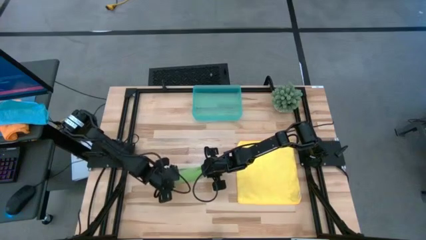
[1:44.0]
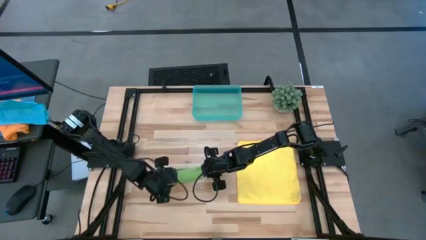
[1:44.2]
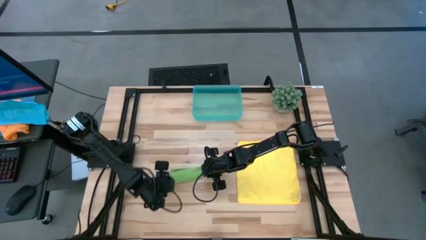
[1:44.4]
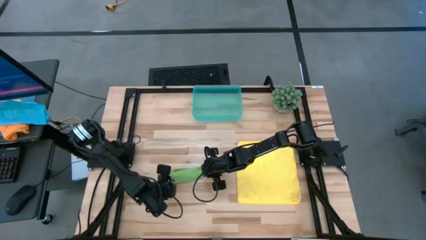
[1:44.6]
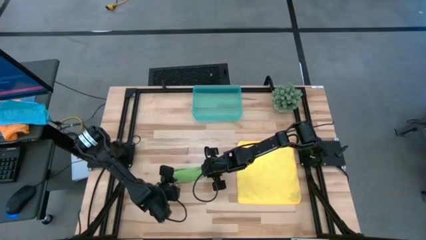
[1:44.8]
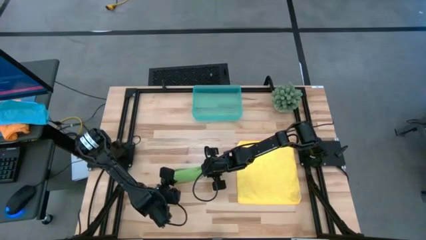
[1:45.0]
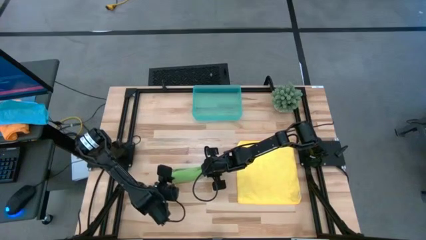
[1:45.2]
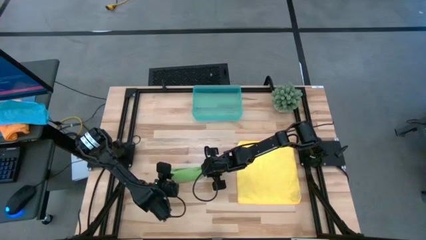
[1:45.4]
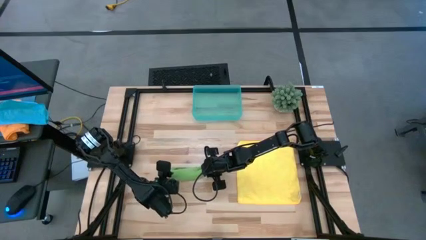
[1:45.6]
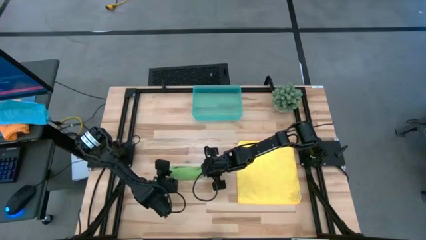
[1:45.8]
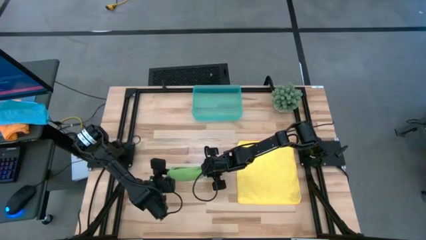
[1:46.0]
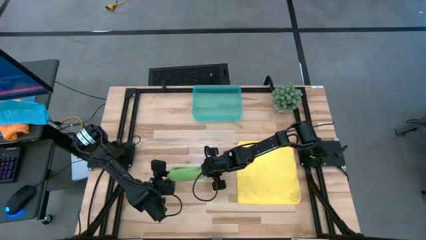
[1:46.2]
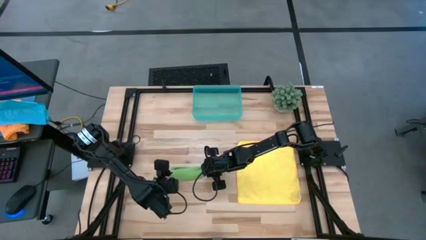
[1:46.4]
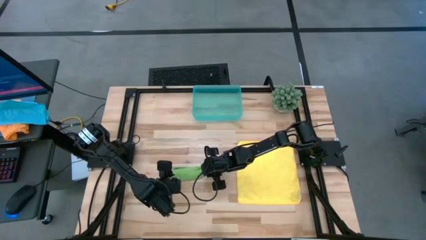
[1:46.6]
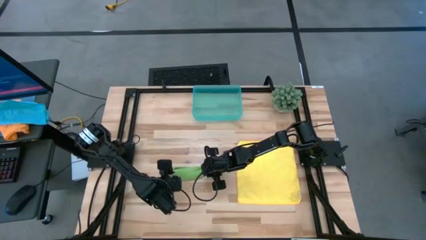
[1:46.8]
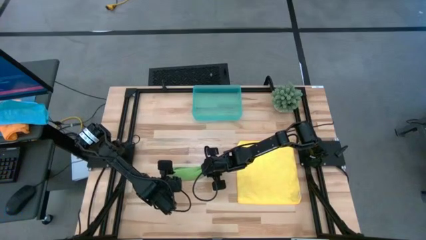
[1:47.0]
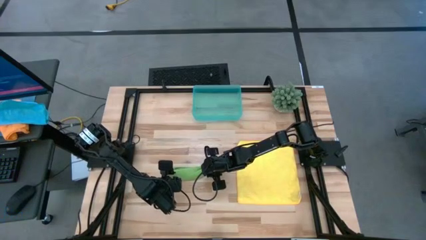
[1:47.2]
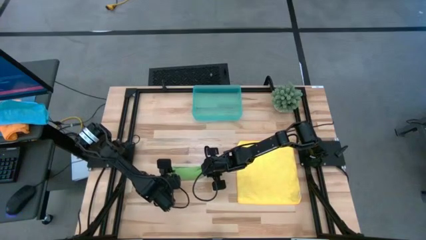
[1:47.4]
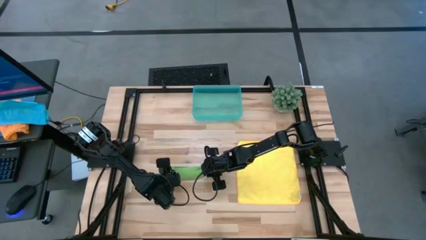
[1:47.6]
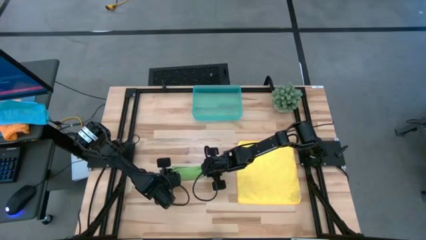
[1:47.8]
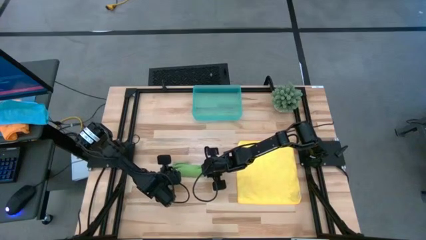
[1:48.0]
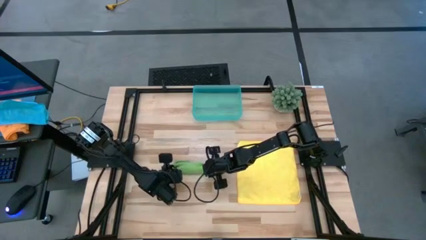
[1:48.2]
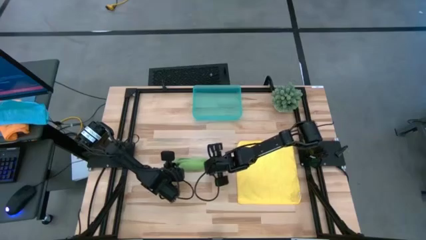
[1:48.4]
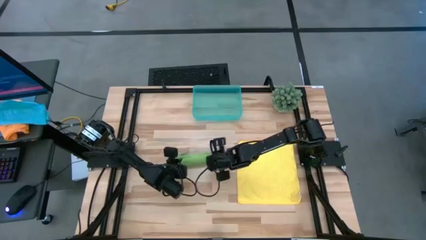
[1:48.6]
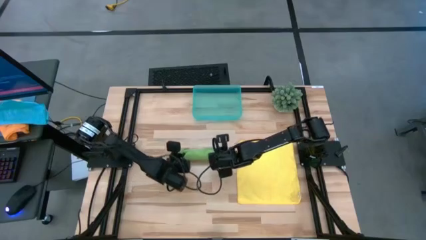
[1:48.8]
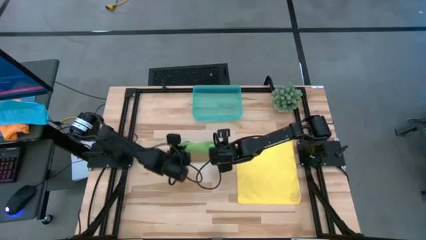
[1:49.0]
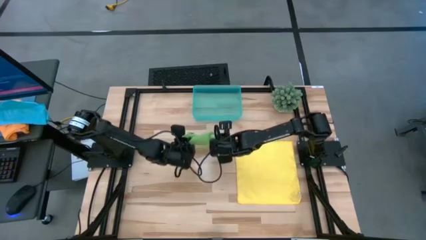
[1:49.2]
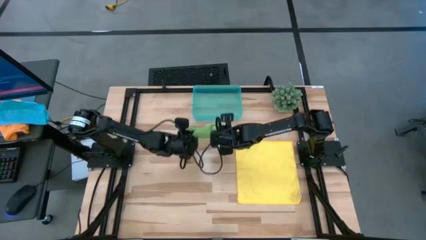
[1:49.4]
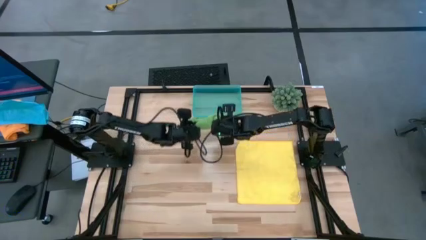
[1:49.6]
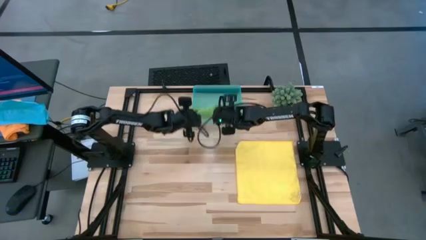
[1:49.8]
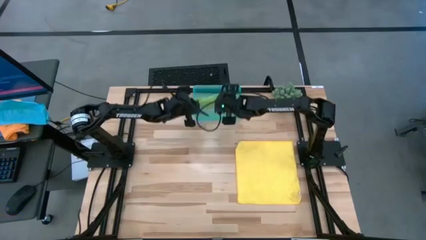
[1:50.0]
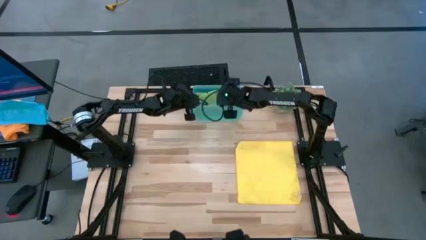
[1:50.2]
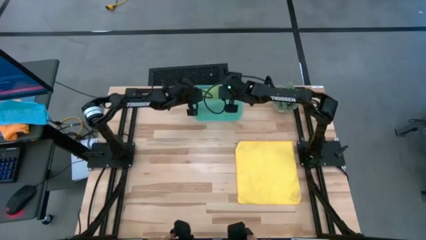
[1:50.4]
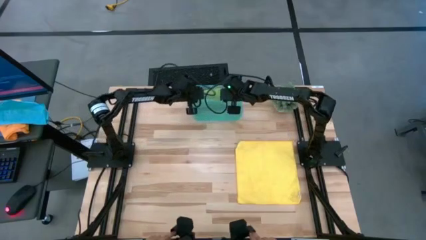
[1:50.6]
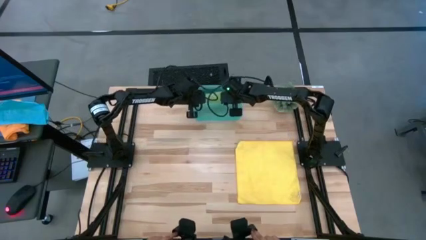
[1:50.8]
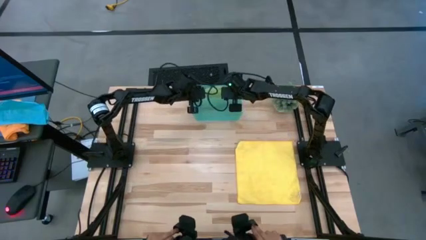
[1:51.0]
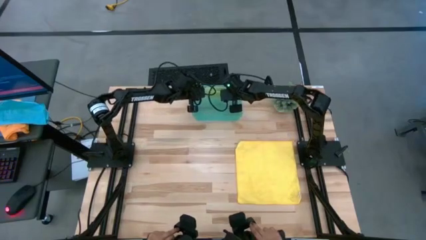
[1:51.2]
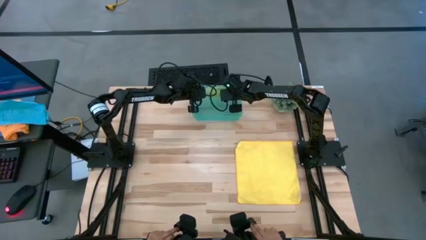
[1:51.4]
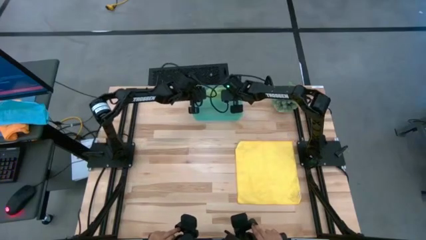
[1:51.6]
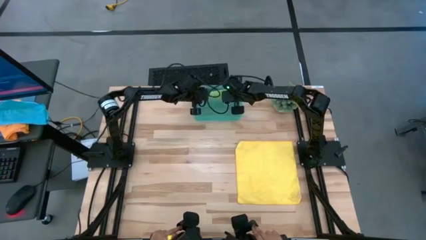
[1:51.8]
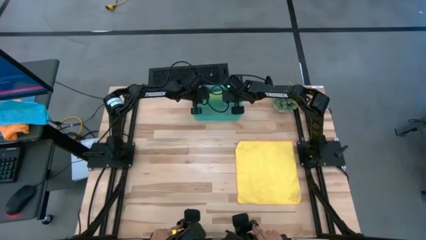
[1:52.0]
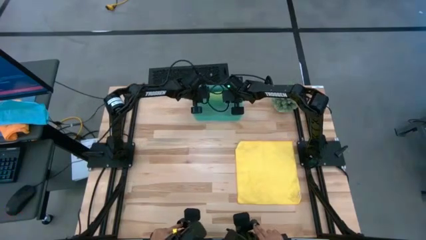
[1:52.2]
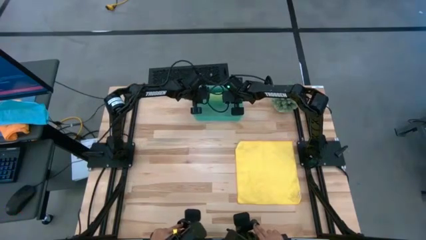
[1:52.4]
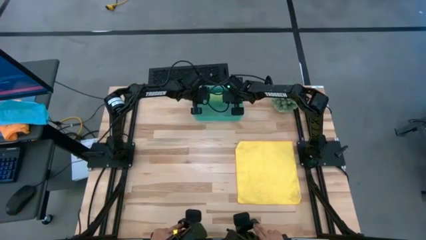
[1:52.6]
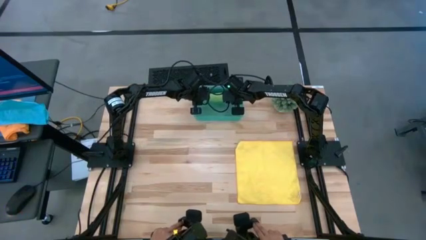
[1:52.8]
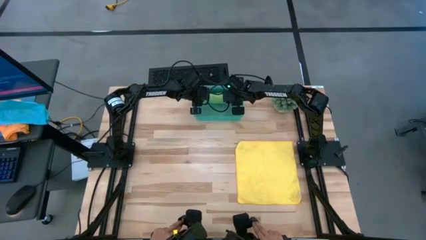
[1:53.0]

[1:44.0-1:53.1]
Task: Roll microfiber towels into tight, uniform cylinder then place into a basket
Put the green towel into the bin
